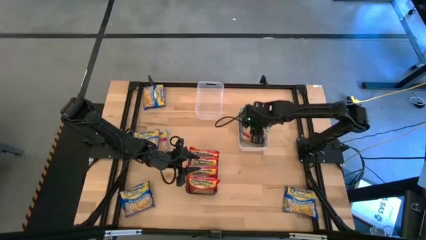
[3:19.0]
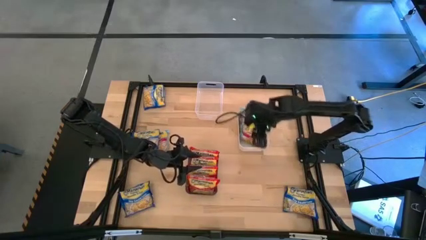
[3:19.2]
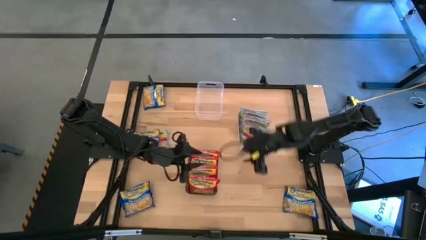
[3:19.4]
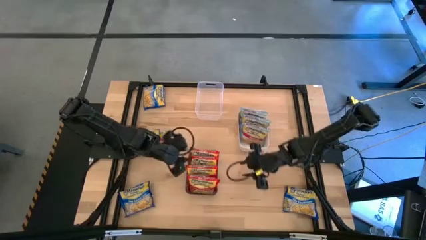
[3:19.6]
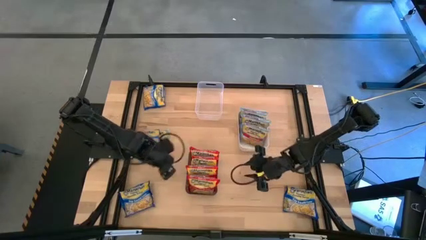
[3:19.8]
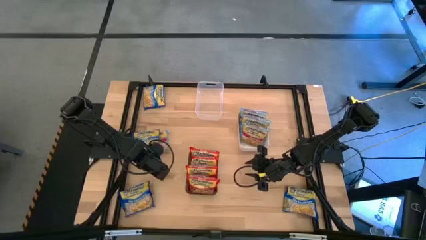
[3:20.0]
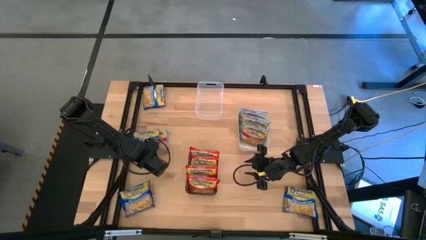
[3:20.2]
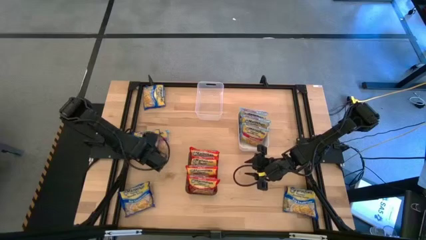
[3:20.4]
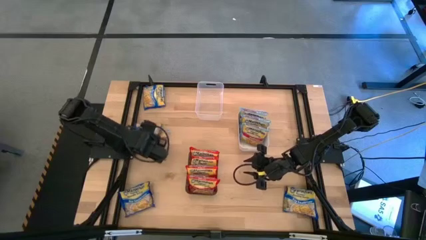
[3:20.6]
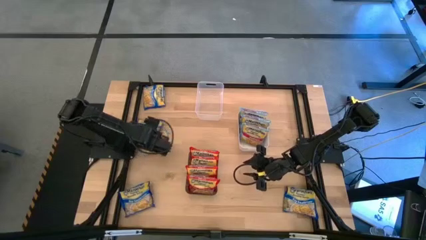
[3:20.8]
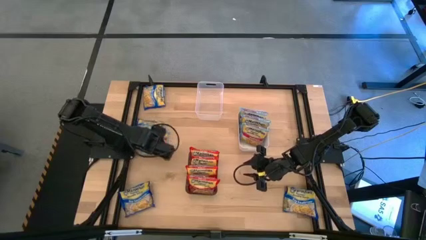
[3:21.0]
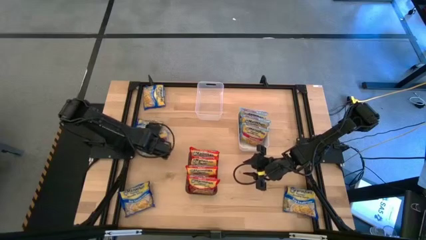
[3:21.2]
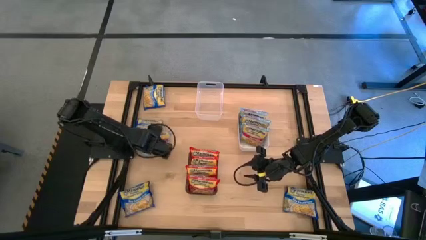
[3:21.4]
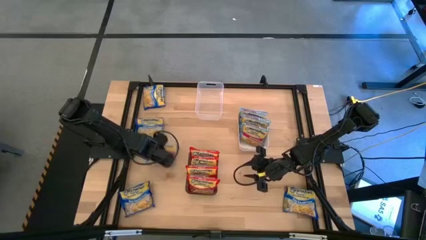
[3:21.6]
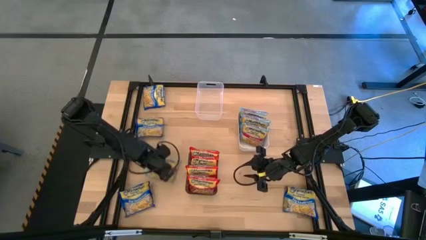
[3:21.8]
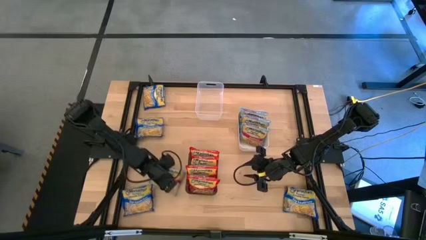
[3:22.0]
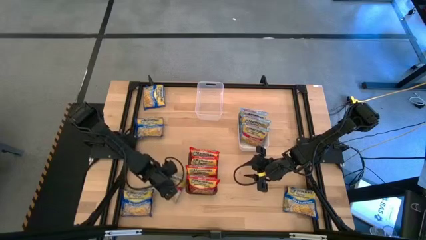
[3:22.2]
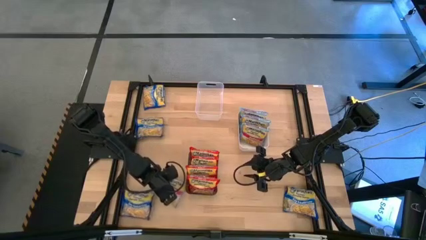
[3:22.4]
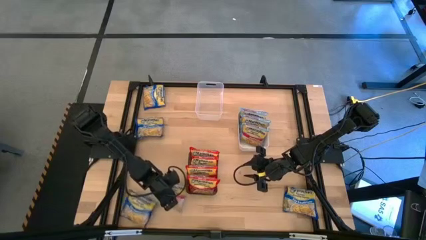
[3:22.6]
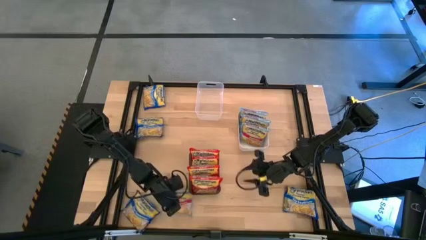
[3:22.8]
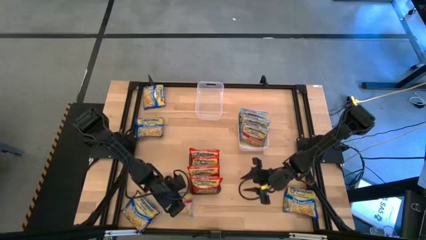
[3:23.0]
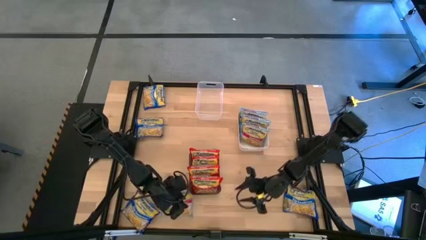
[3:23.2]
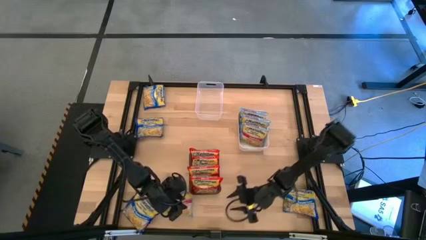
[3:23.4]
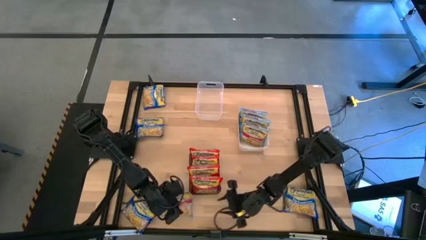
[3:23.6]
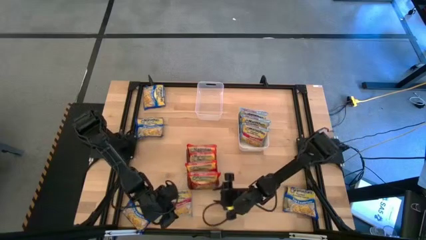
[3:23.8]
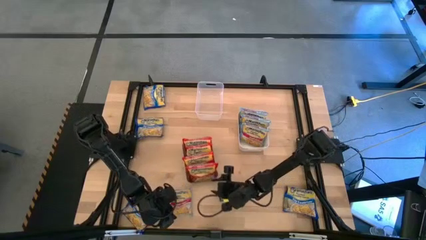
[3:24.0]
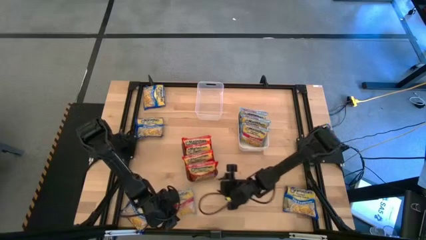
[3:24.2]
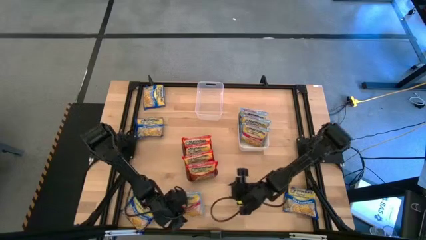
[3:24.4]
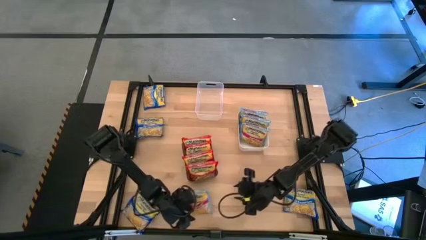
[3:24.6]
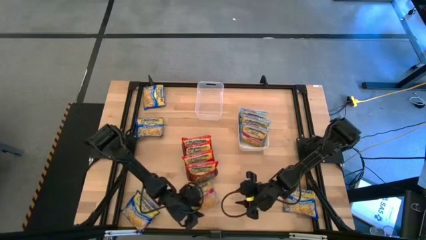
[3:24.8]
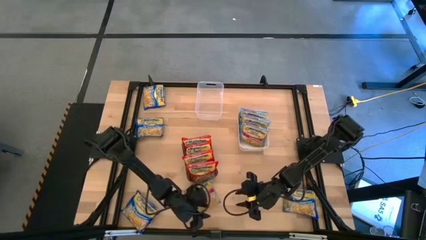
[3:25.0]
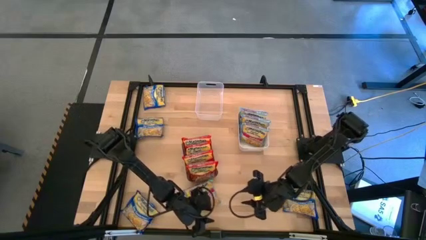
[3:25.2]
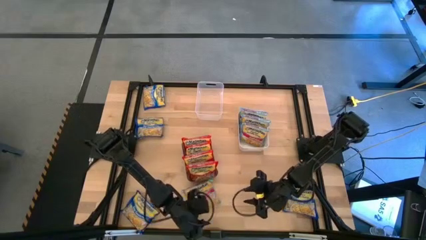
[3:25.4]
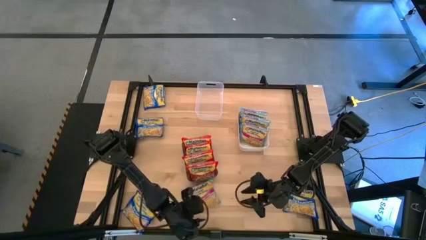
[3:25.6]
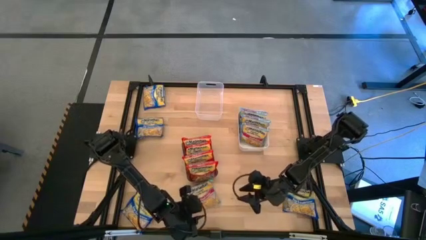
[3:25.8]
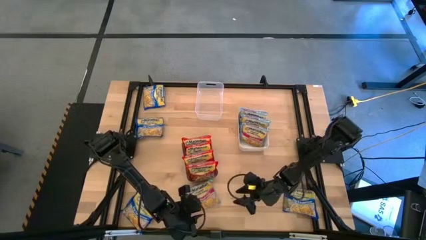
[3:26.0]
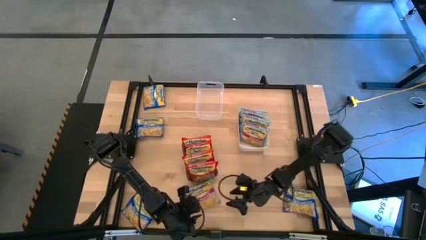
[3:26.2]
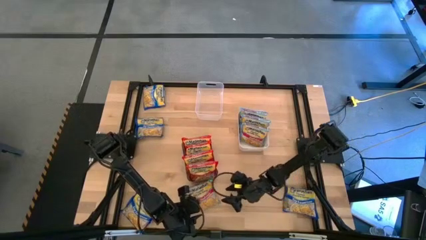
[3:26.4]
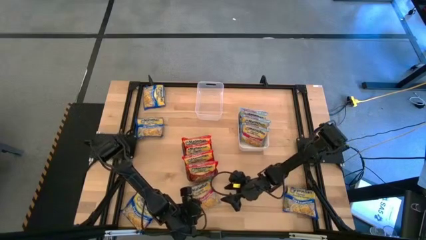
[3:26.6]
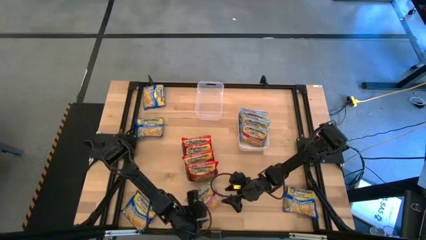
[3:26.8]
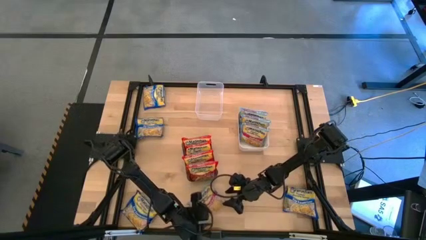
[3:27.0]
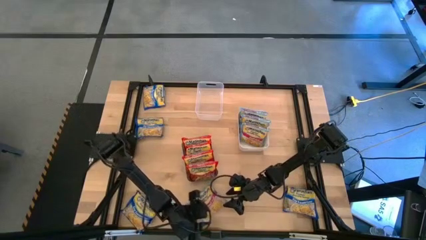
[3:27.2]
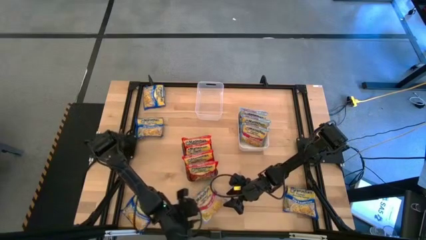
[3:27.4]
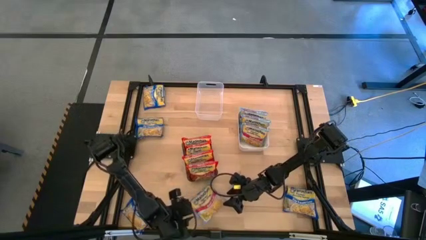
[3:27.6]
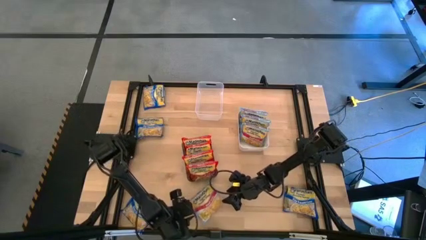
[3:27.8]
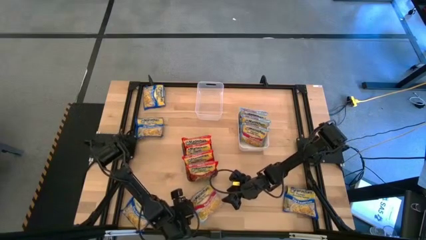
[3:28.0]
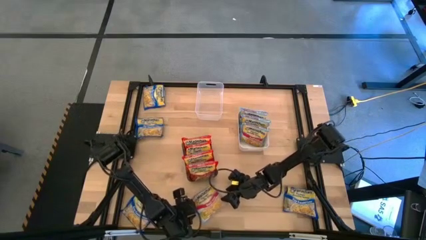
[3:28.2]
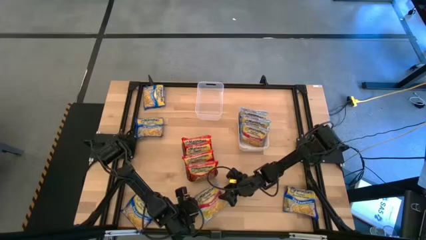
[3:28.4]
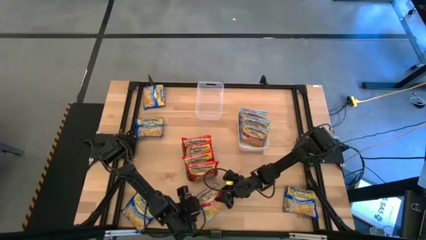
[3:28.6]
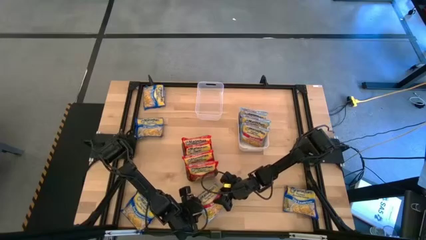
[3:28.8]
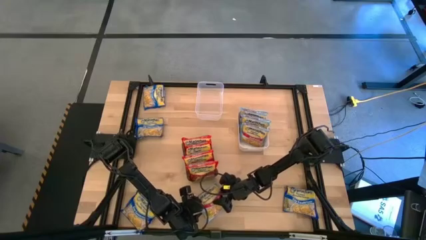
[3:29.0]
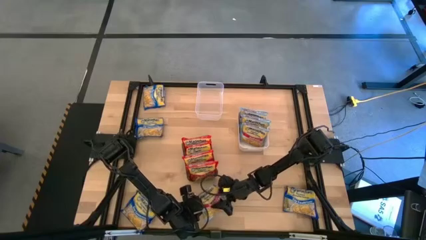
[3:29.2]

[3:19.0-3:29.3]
Task: Sort Maruchan noodles
Put the light blue noodle pack into the white bin

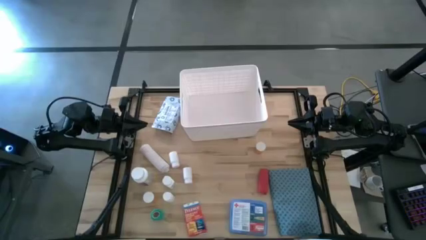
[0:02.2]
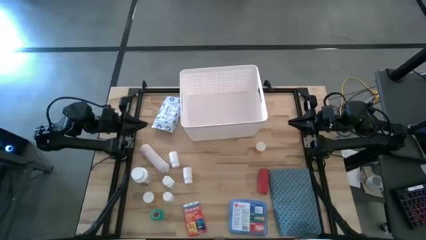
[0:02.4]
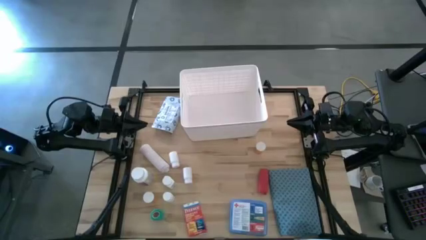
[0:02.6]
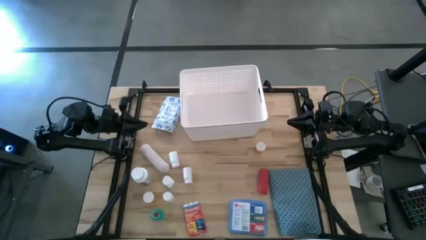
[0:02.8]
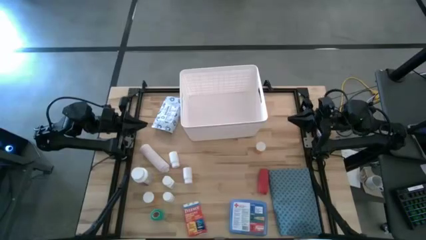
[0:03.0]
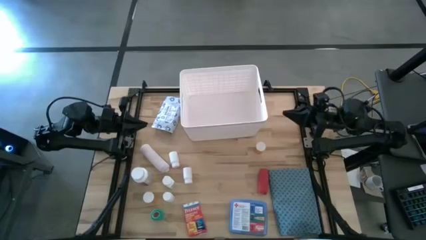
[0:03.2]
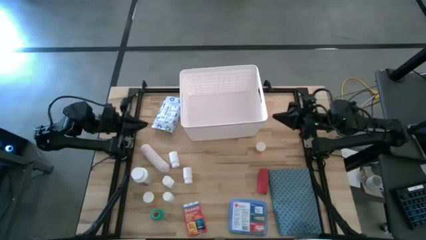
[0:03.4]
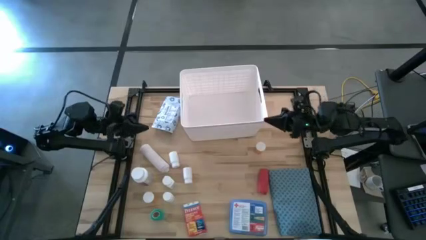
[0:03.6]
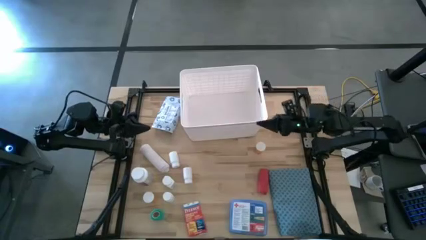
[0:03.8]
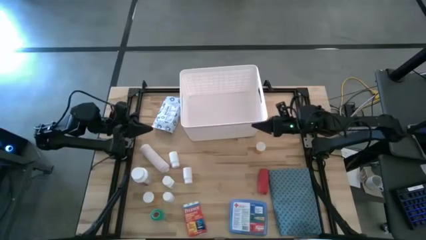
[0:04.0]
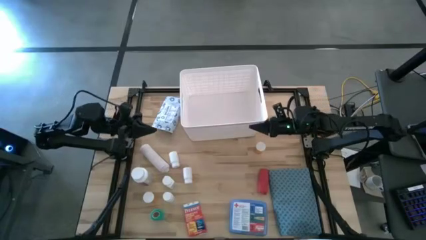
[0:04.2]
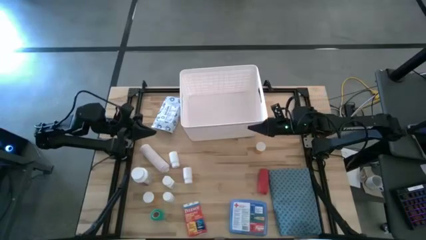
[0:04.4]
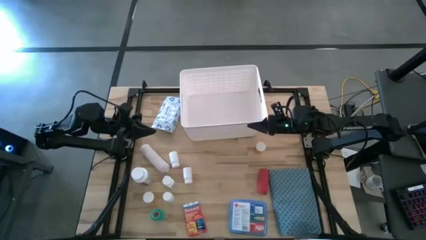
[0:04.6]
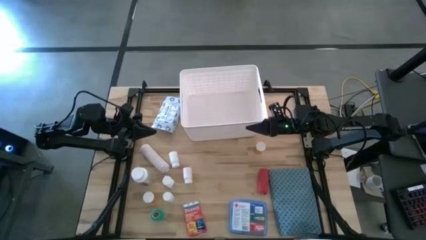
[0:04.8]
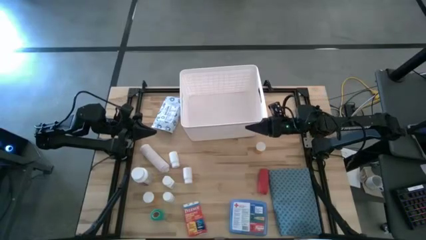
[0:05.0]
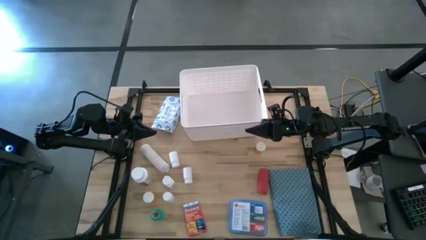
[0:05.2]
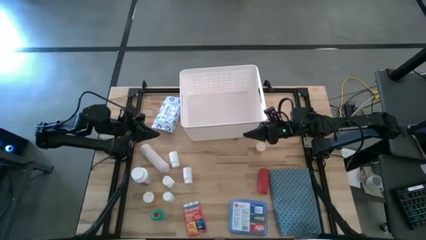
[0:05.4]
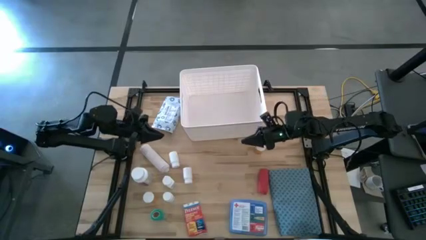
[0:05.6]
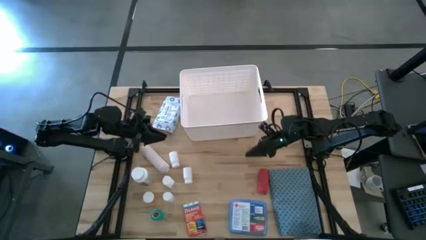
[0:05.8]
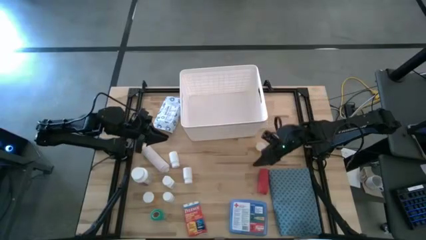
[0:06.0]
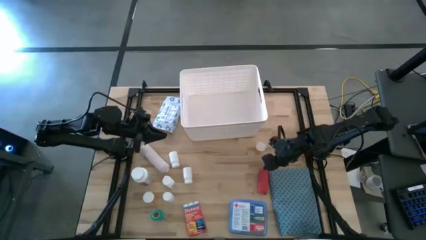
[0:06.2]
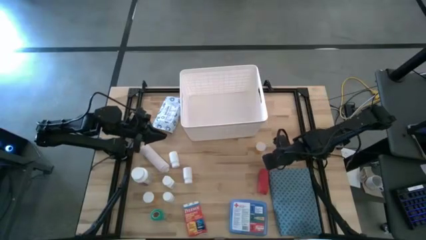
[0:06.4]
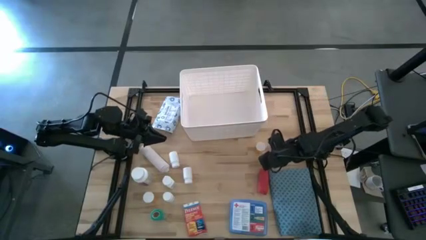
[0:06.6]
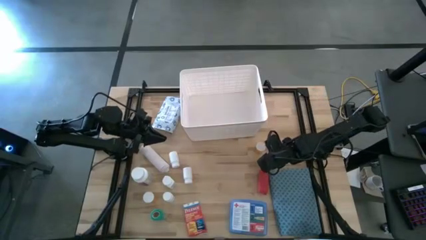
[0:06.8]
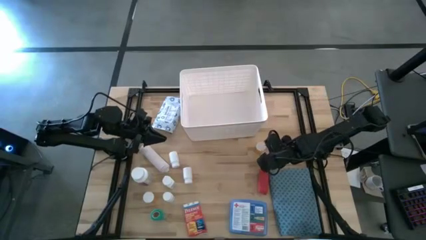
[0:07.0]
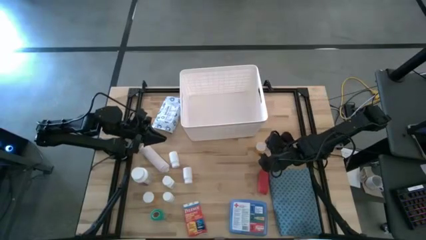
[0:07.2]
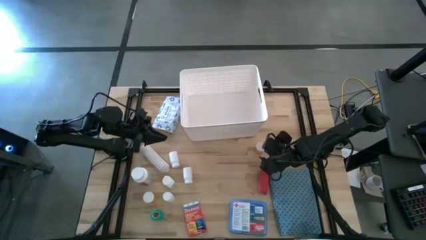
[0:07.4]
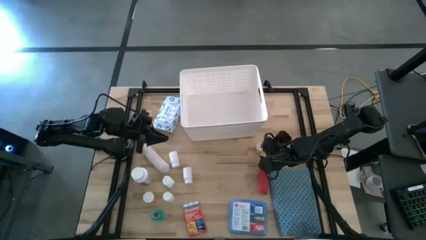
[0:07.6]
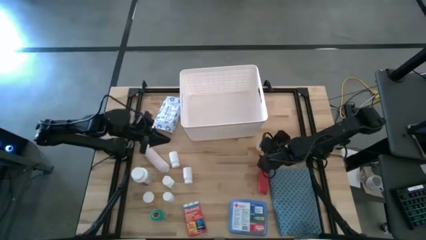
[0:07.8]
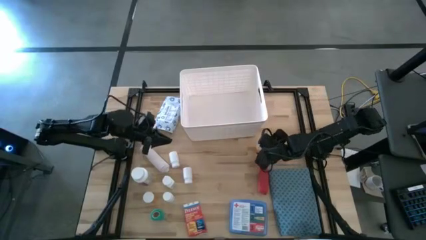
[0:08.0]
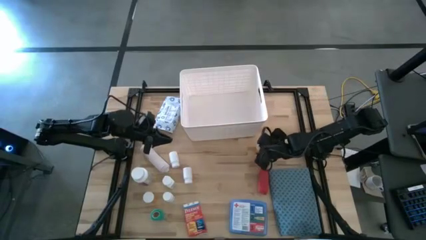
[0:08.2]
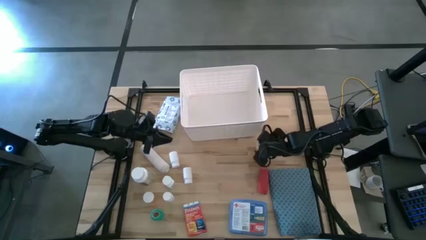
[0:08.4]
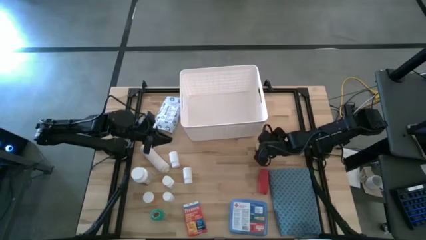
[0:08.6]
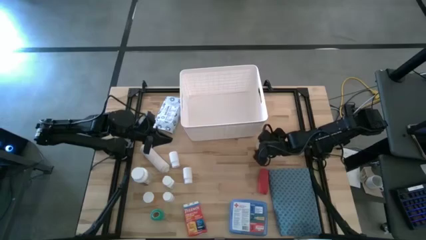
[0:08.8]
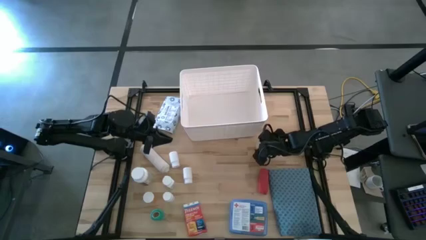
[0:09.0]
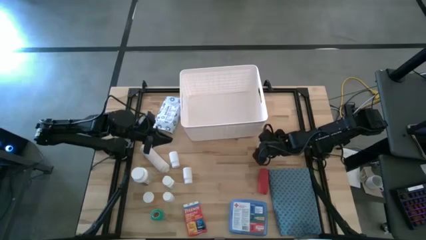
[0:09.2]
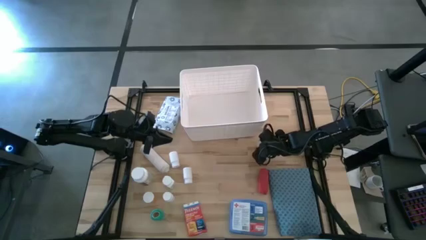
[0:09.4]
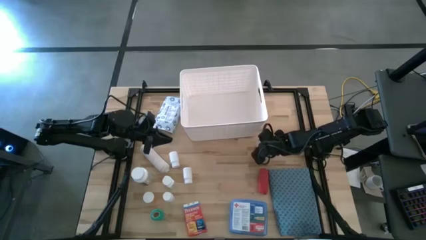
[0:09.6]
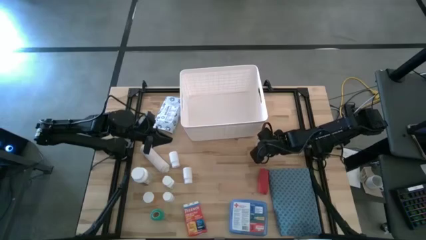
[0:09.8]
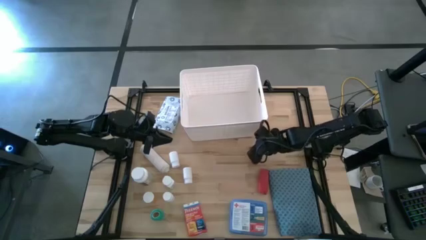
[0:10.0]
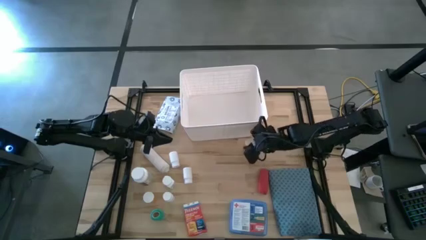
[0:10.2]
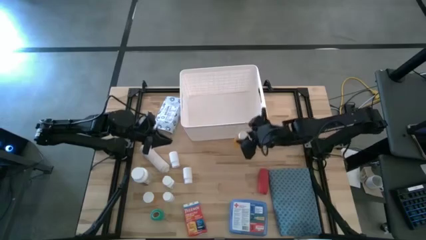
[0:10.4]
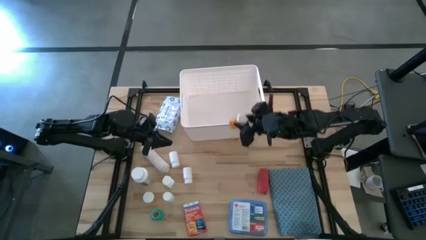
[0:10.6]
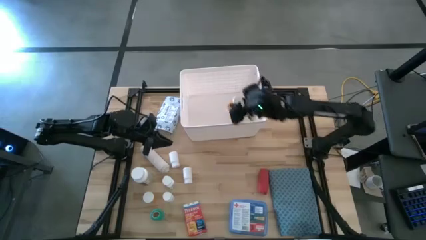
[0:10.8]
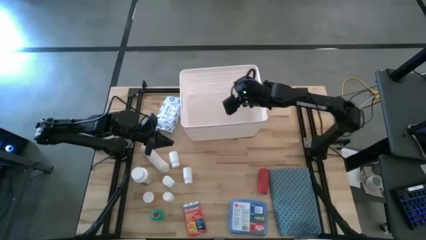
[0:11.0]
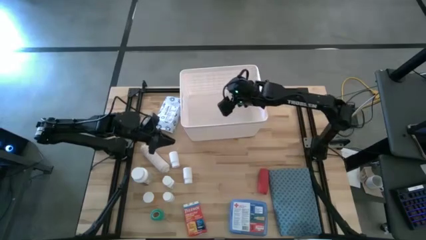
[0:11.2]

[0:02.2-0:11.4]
Task: Pick & place medical supplies in basket/bin
Put the top orange medicine bottle into the white bin
